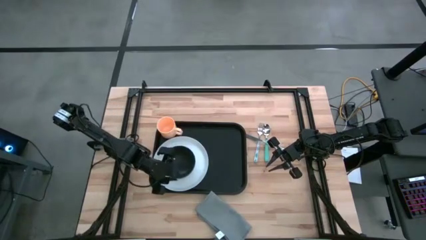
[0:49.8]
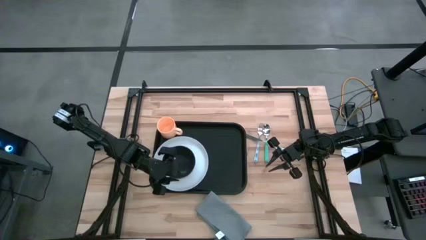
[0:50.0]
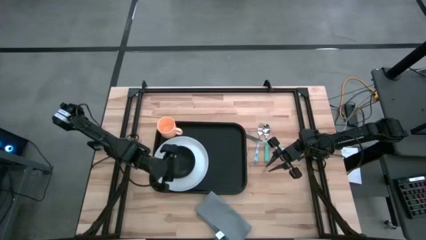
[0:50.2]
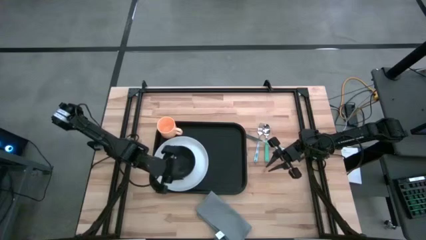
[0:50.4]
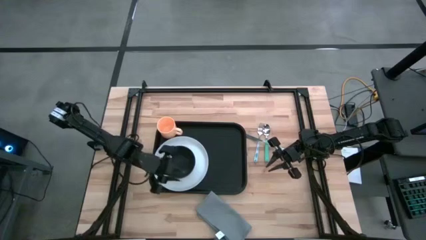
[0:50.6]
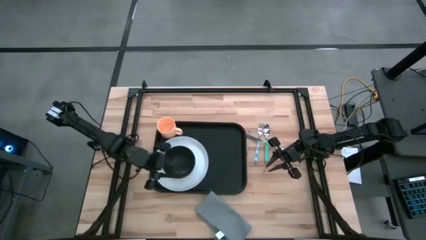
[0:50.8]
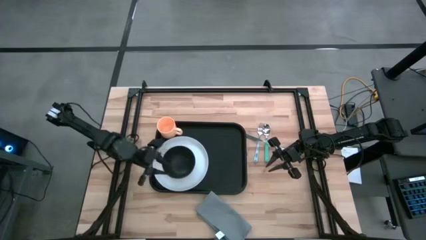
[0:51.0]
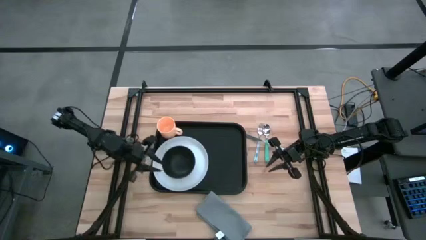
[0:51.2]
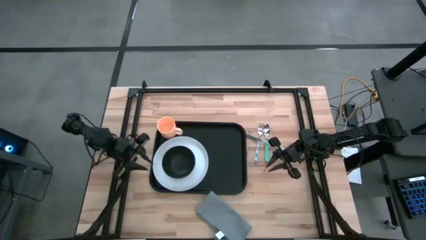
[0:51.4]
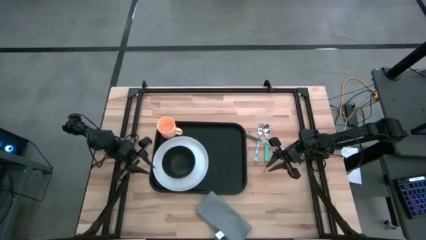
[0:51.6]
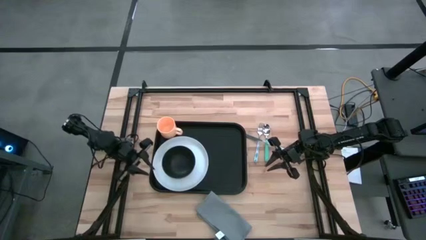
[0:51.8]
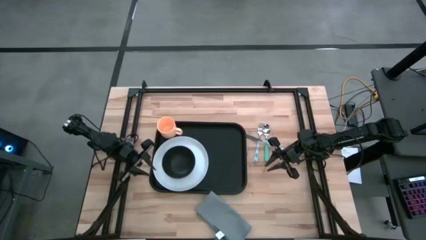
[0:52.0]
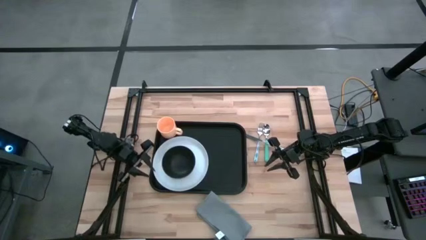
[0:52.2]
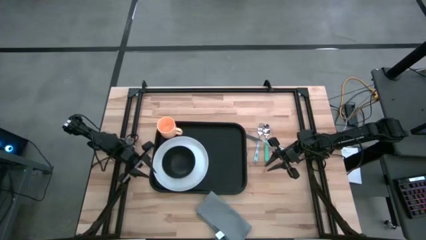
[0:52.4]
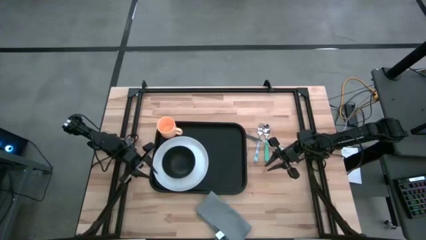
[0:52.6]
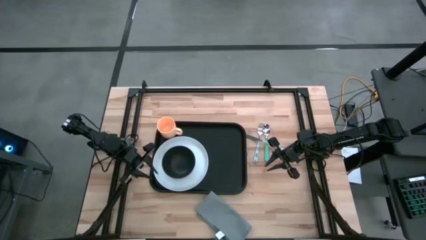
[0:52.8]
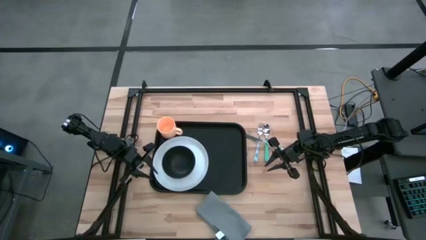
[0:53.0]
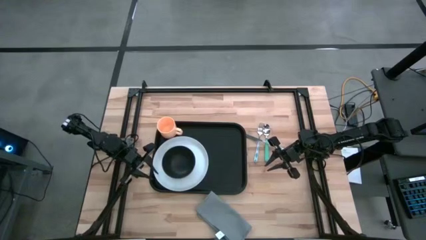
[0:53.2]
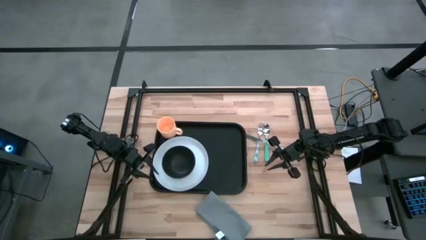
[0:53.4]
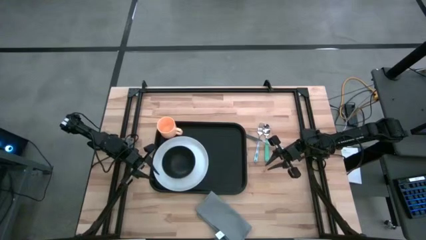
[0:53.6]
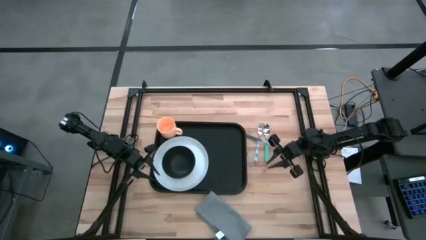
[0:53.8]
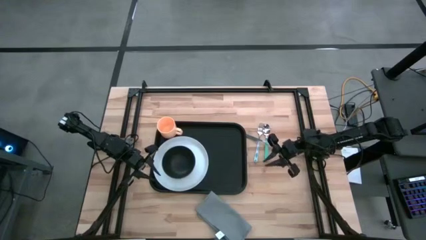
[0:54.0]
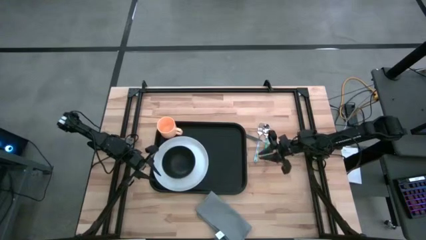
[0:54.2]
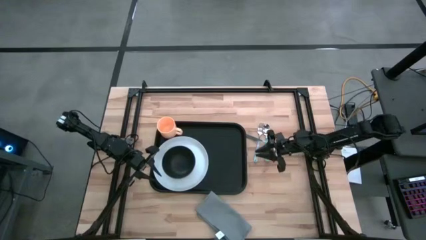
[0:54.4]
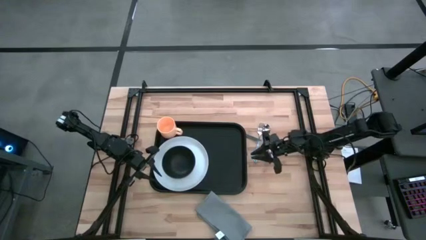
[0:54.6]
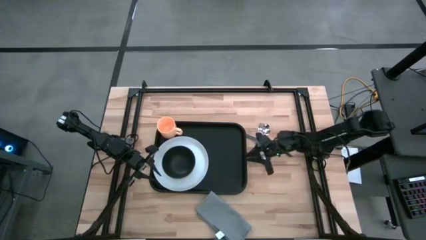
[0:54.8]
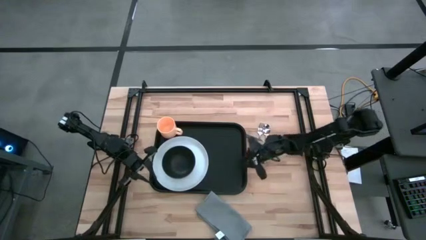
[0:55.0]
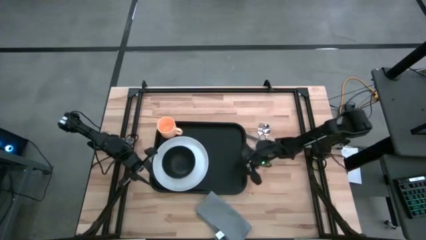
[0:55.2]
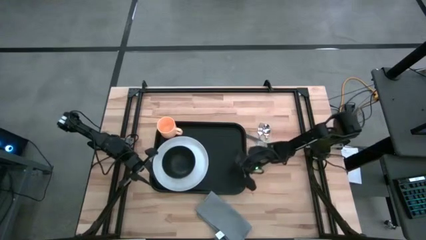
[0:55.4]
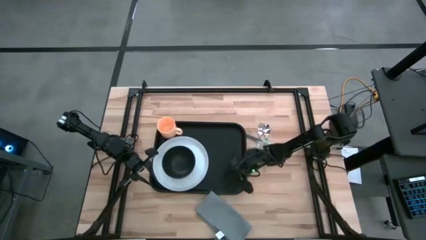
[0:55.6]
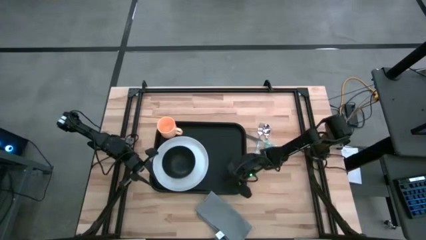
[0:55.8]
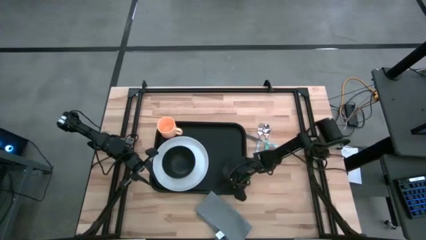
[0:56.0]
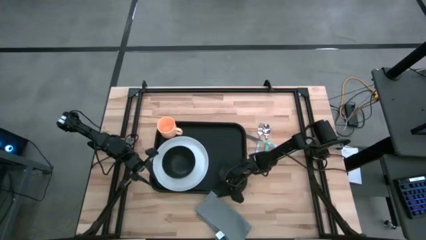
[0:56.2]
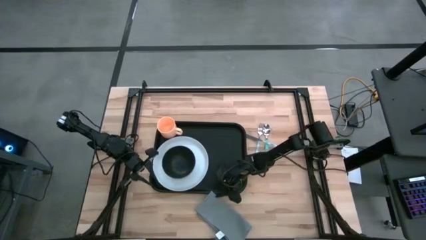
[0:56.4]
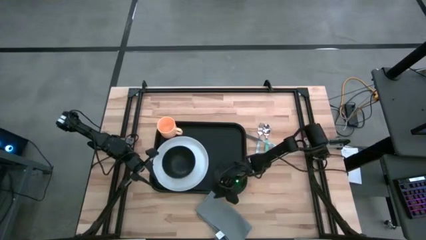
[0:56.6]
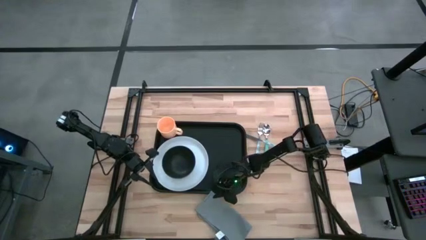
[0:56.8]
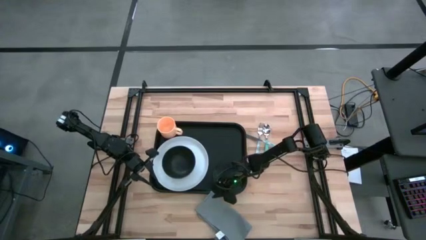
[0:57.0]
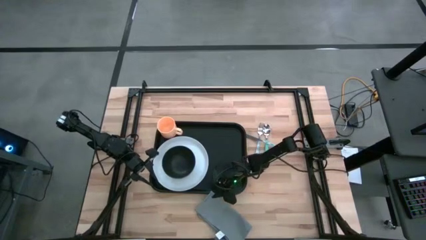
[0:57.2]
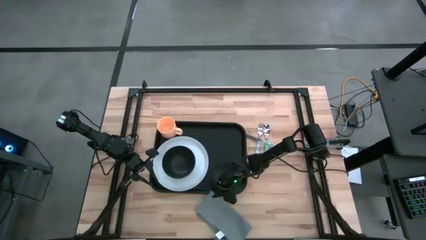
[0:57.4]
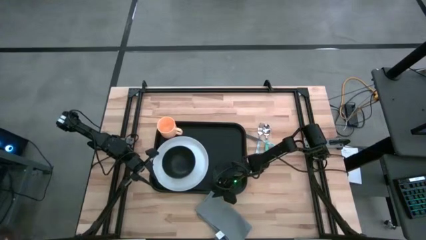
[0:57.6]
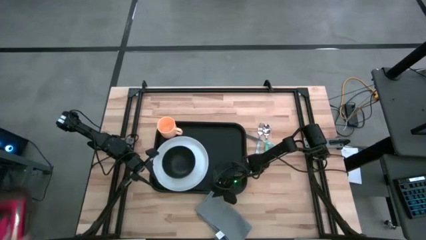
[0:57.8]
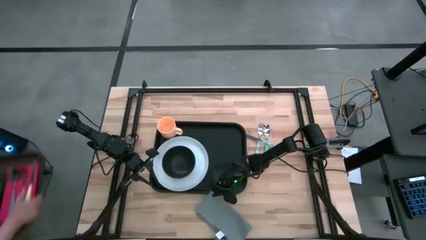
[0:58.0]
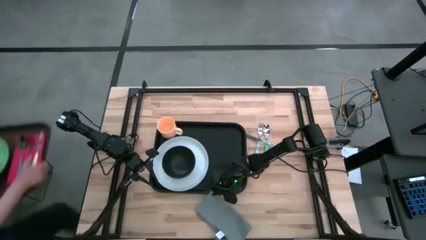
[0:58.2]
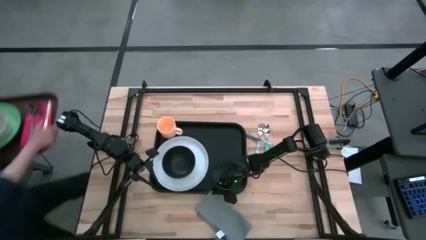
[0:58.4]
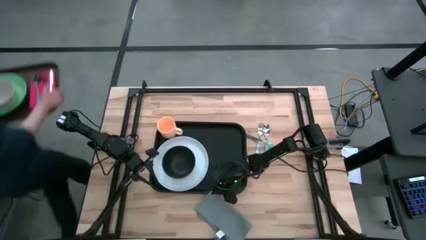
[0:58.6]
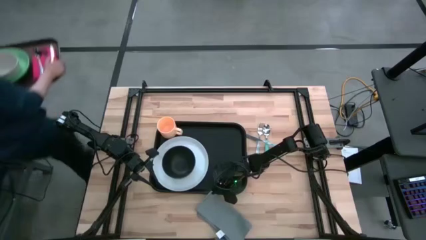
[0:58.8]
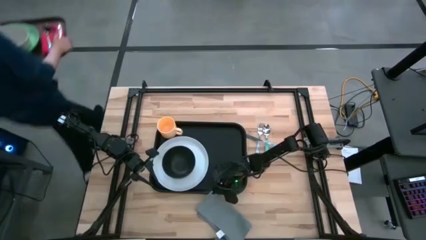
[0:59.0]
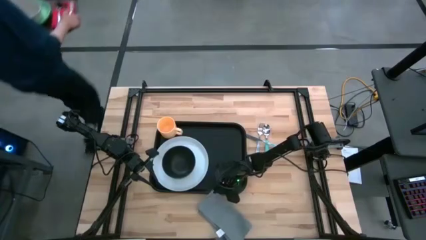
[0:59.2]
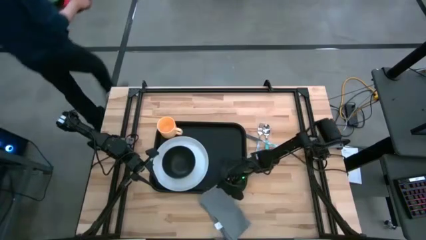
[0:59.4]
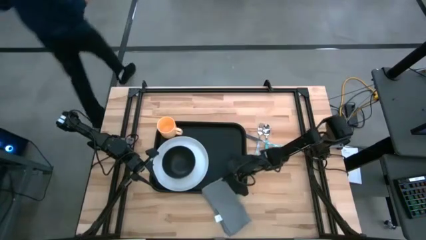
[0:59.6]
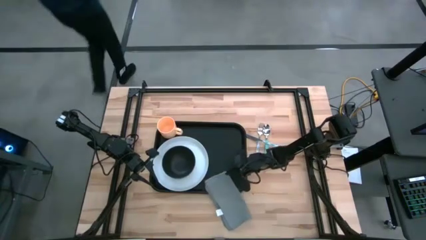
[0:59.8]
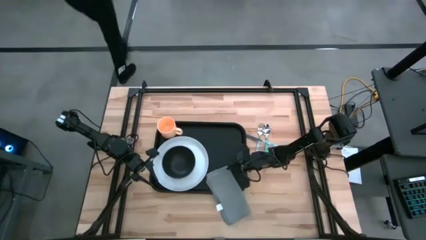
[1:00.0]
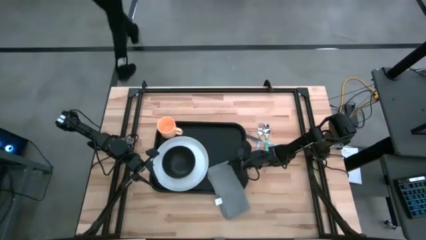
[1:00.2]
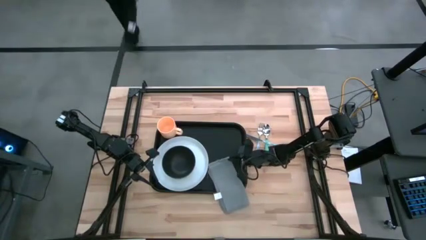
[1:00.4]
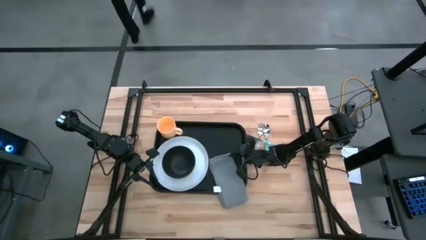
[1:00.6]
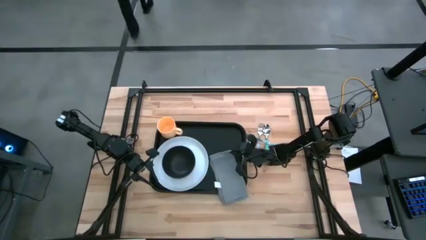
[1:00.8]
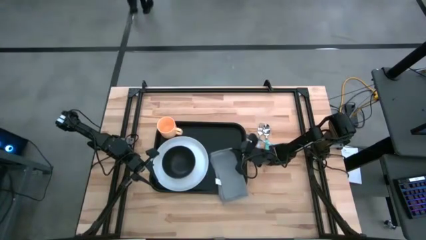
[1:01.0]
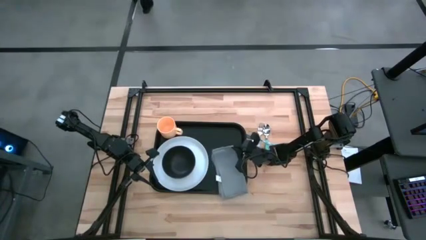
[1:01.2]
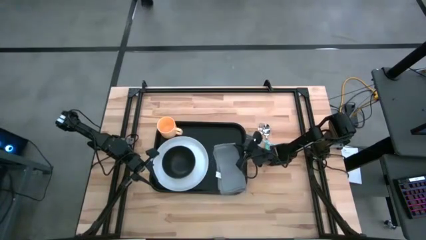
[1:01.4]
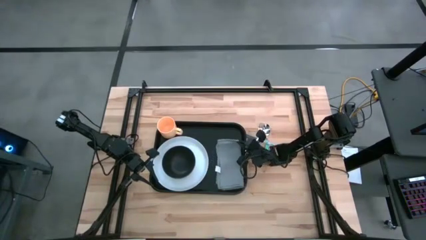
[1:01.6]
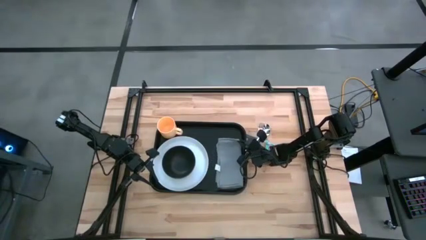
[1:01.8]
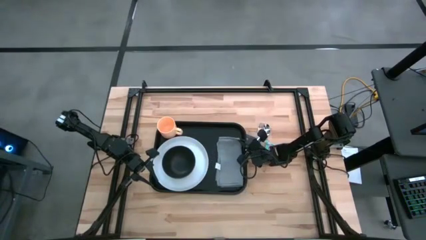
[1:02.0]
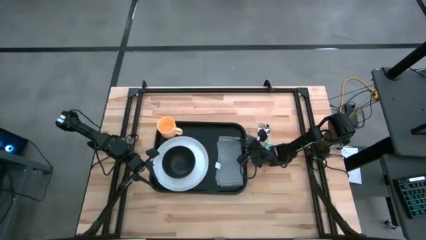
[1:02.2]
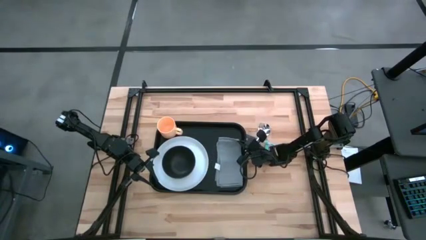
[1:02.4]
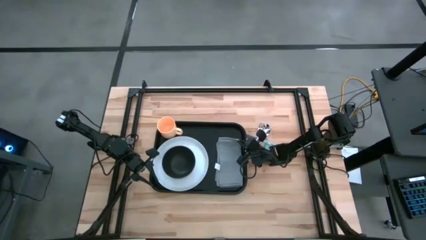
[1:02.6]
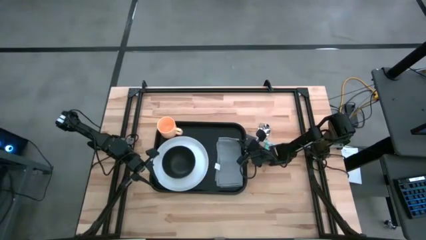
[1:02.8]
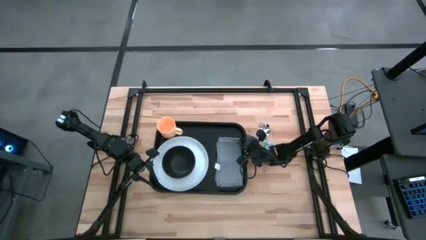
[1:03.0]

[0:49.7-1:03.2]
Task: Set up tray
Put the gray table napkin on the right side of the white plate
